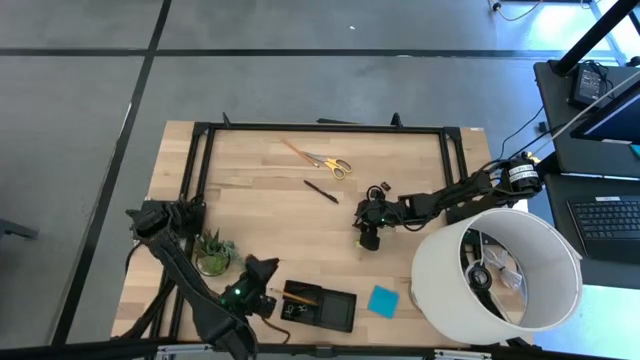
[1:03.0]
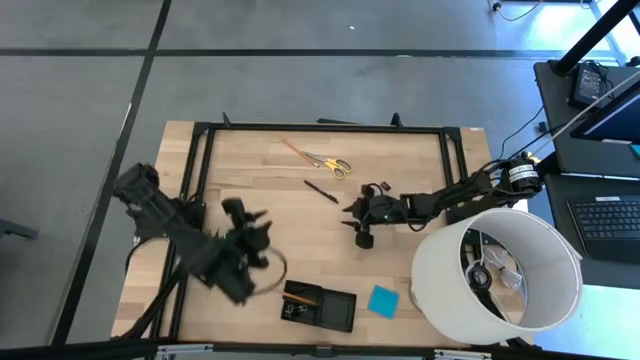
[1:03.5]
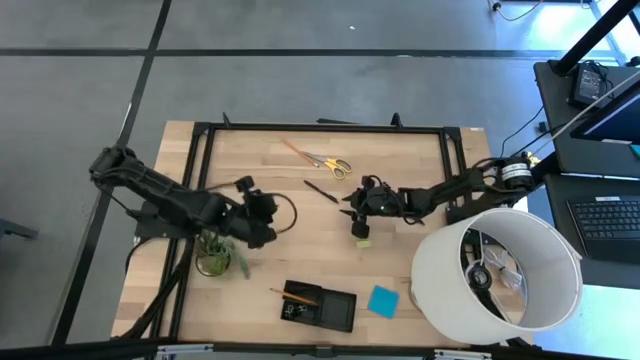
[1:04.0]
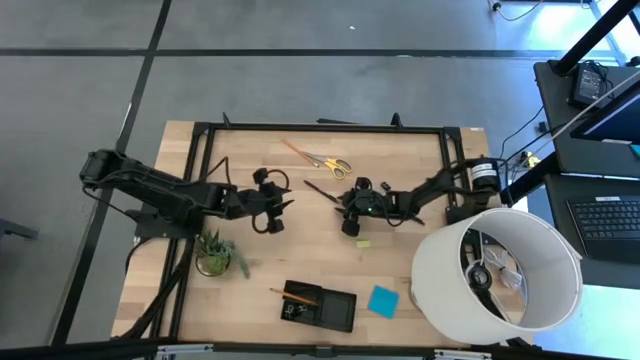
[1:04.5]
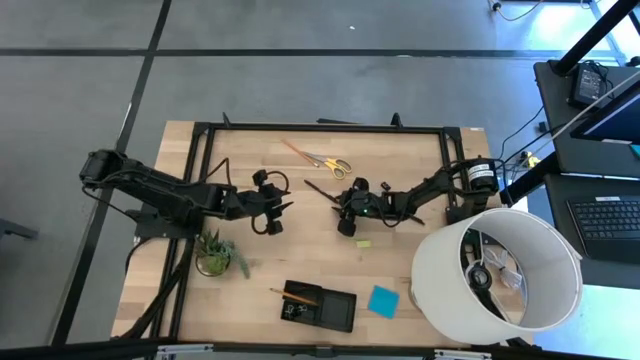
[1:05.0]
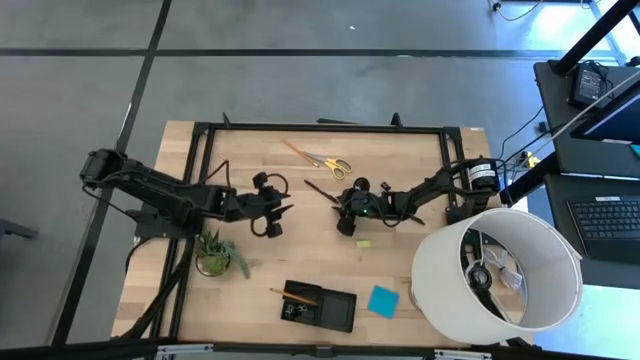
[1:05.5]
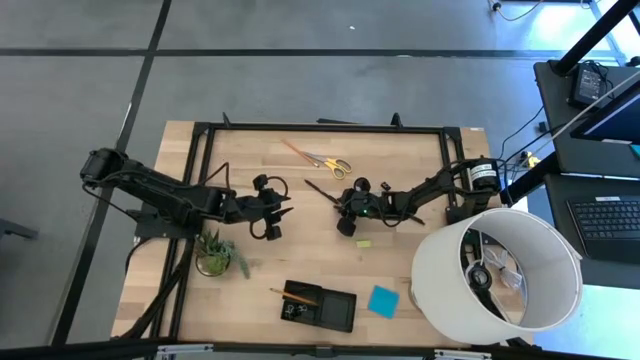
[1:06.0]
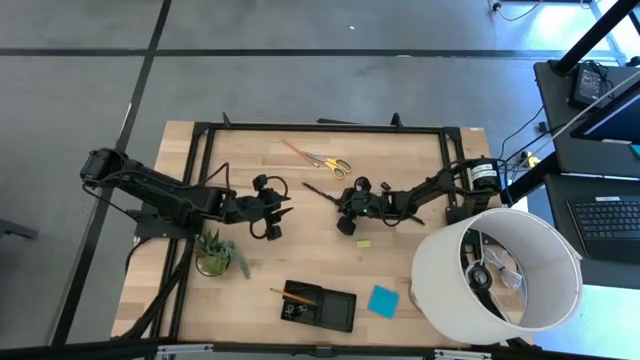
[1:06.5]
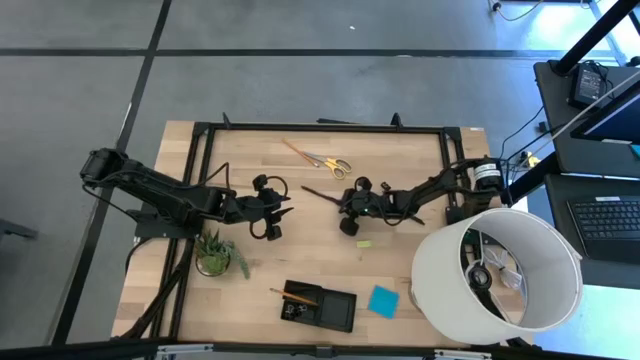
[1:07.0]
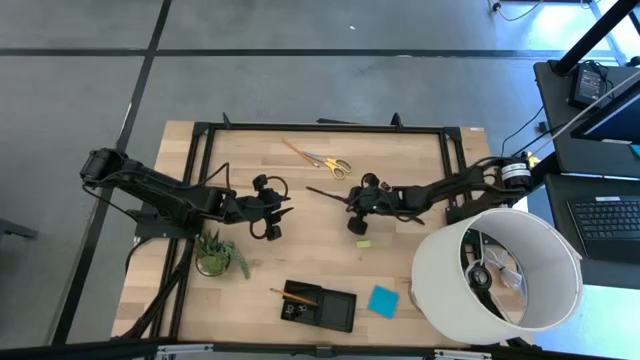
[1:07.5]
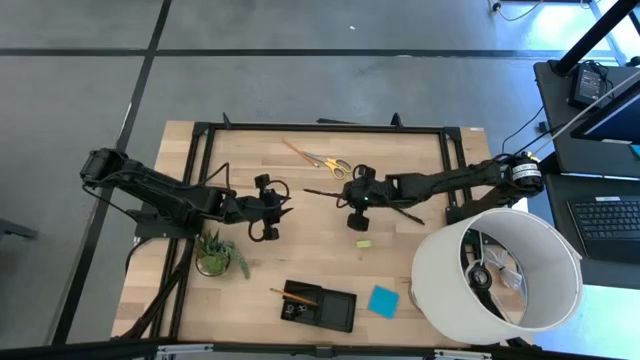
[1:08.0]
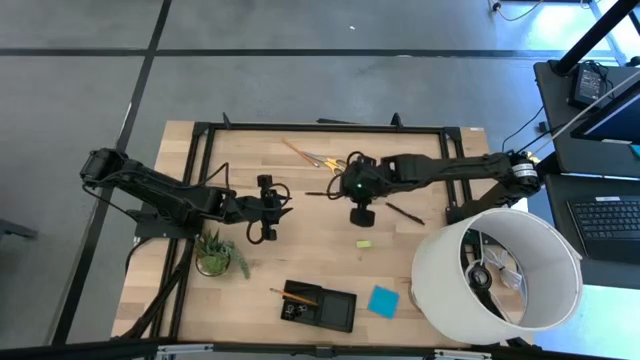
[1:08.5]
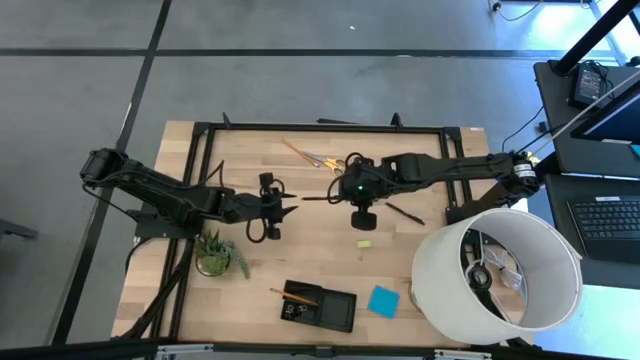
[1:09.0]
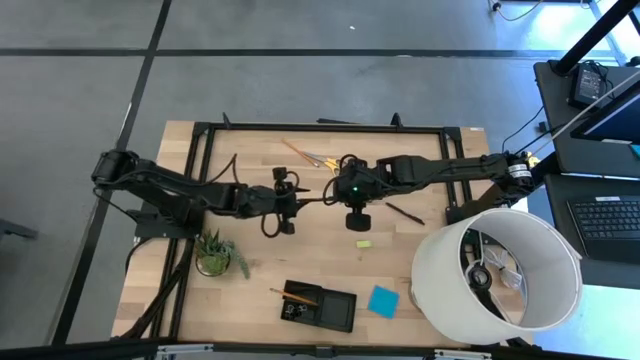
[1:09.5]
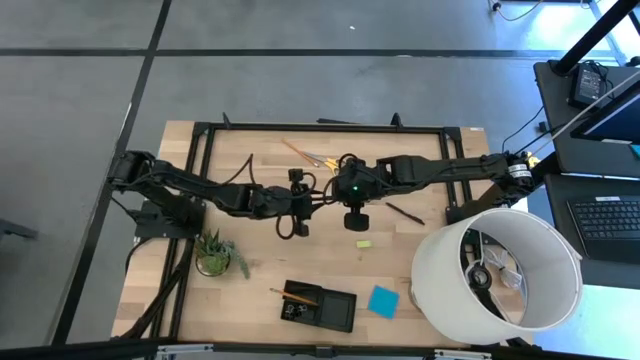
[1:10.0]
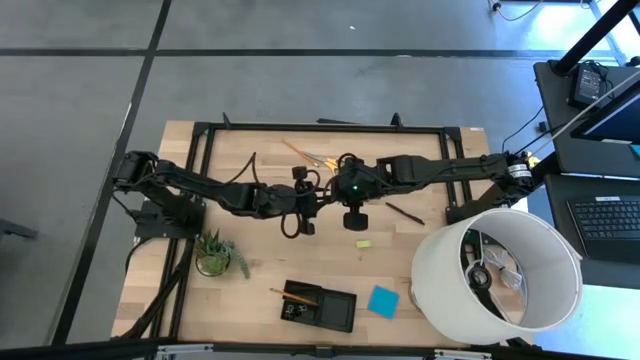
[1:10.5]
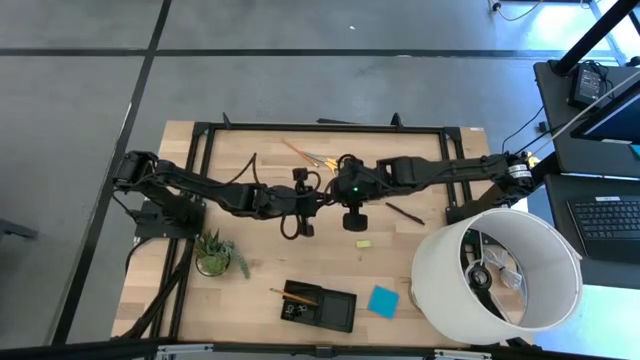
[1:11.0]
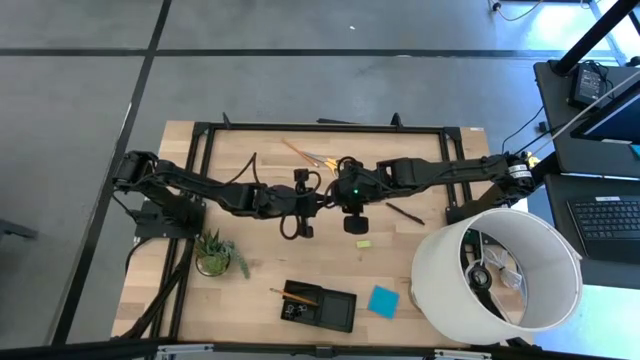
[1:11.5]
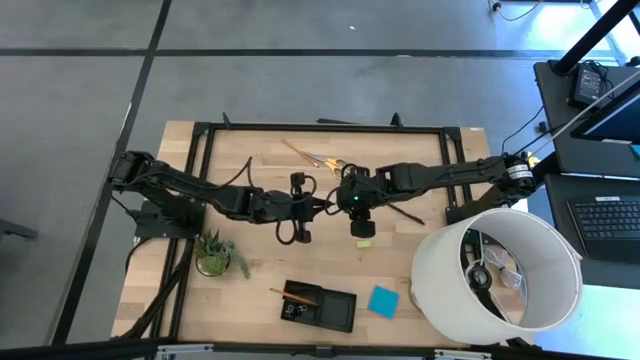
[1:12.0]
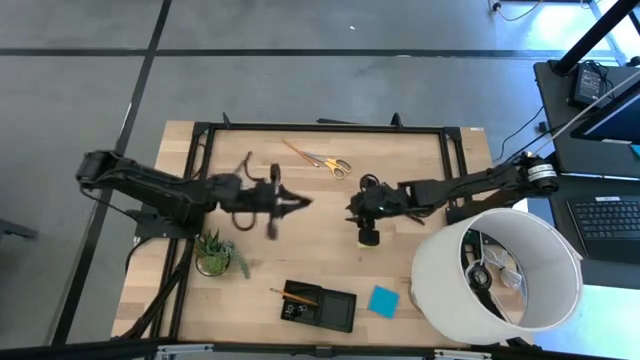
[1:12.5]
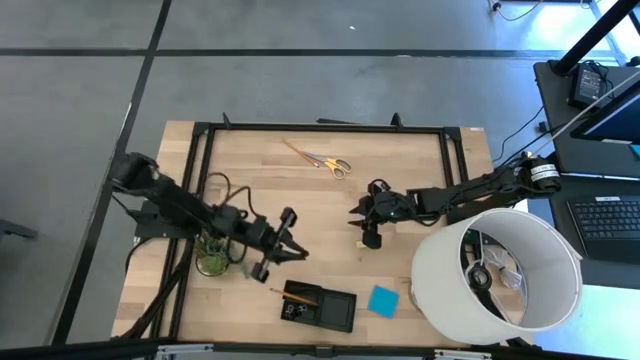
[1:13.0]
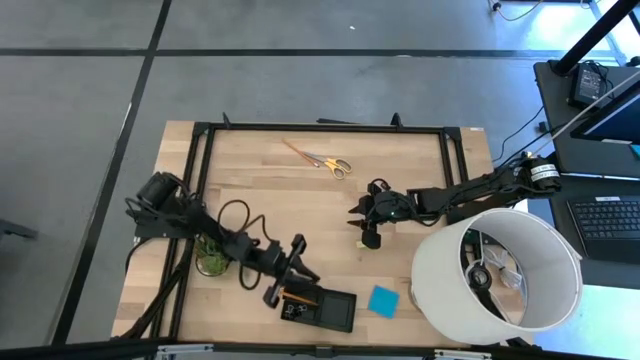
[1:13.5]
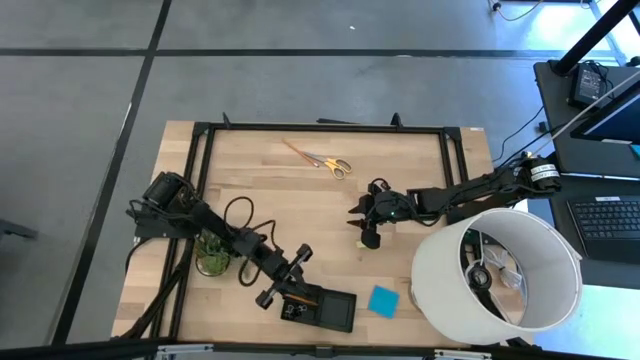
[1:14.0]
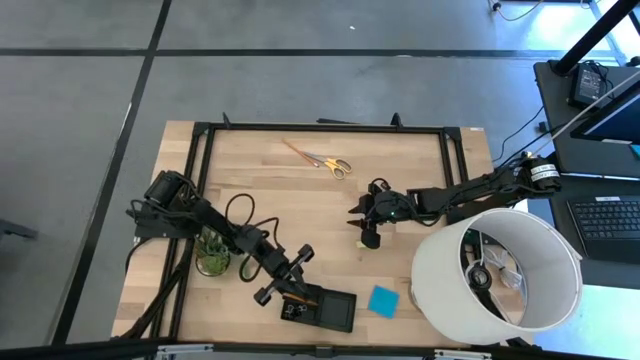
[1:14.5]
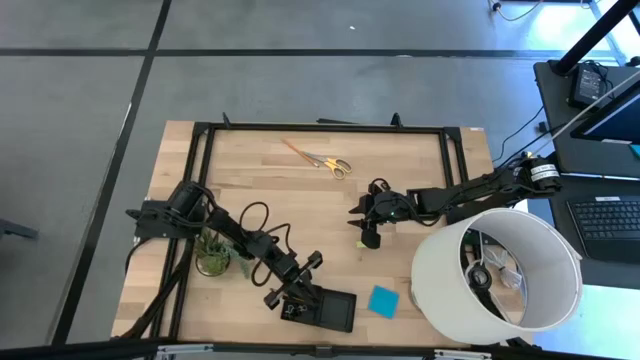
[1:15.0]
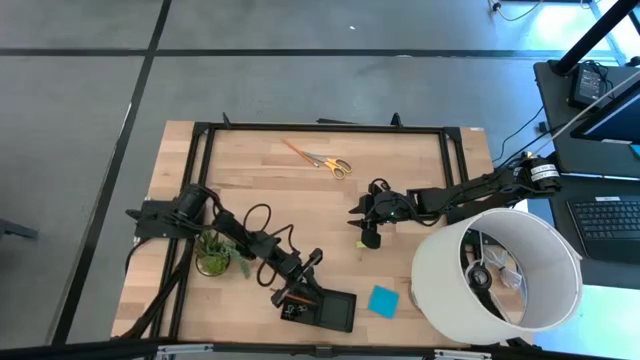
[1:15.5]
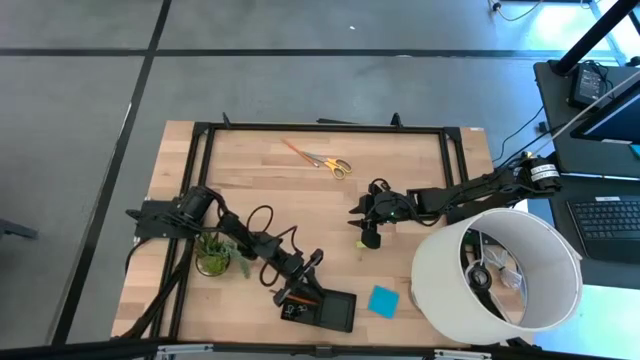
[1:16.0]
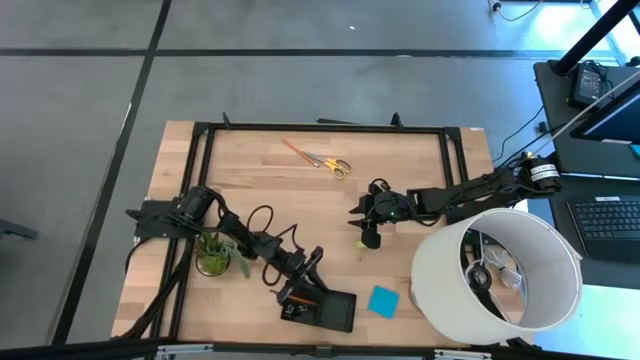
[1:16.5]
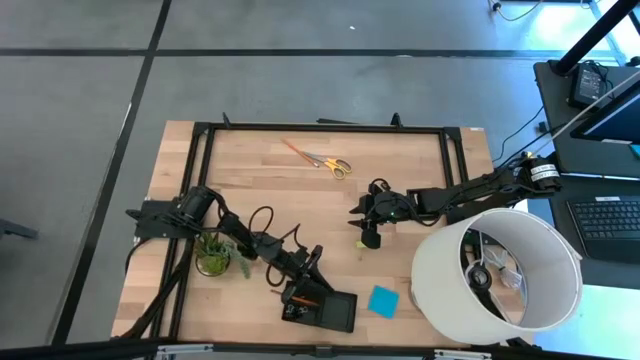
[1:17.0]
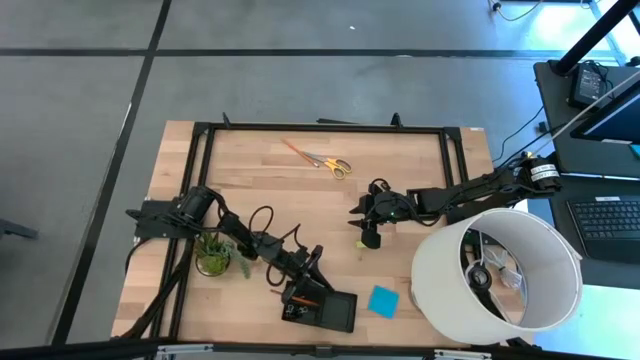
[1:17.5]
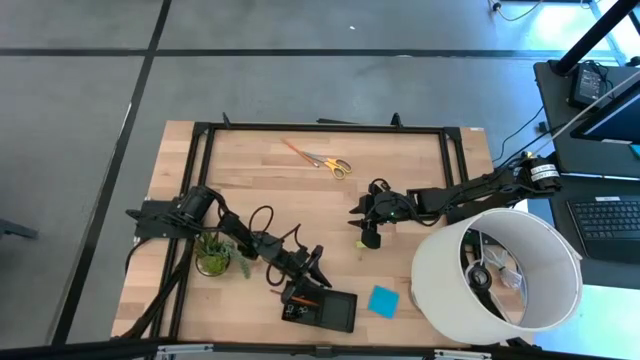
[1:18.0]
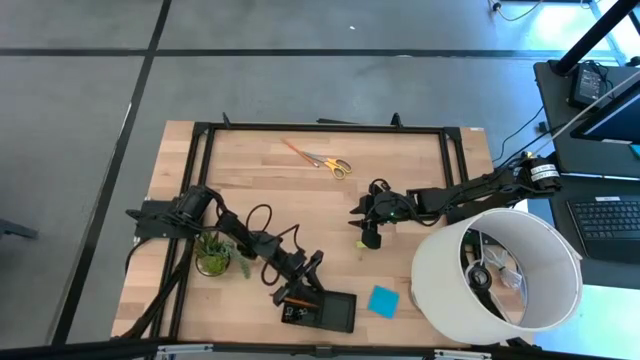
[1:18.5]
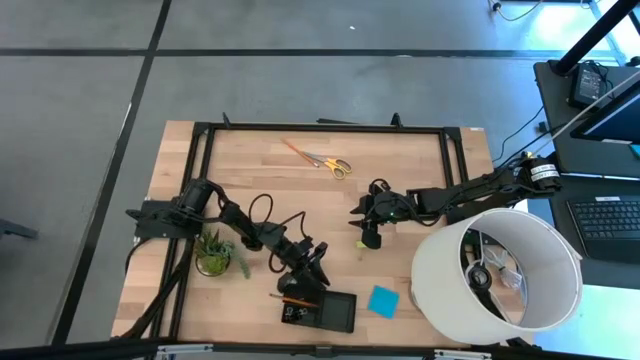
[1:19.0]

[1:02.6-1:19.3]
Task: Pick and place office supplies into organizer
Put the left black pen into the black desk organizer

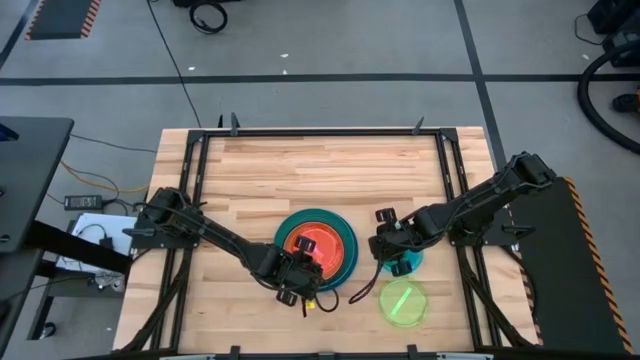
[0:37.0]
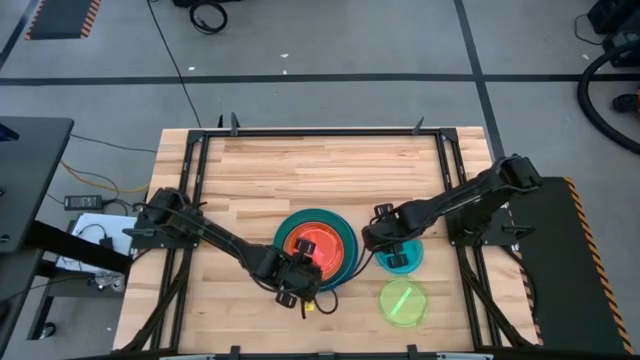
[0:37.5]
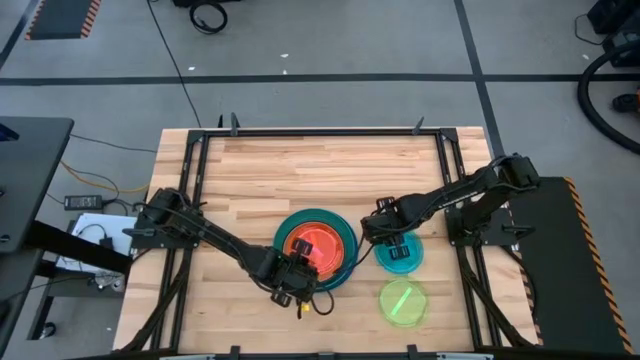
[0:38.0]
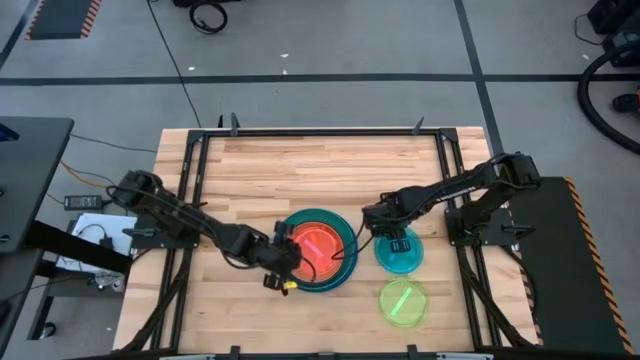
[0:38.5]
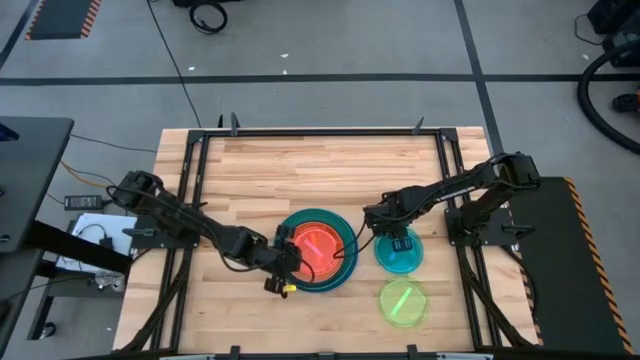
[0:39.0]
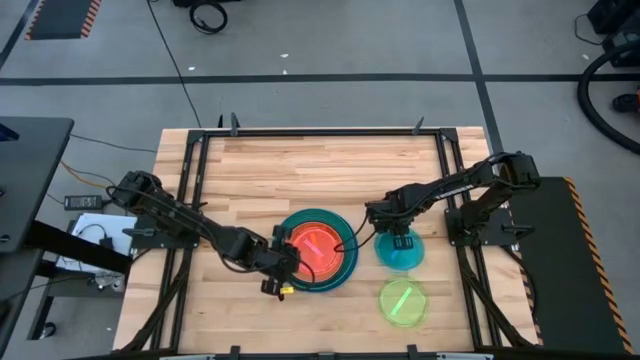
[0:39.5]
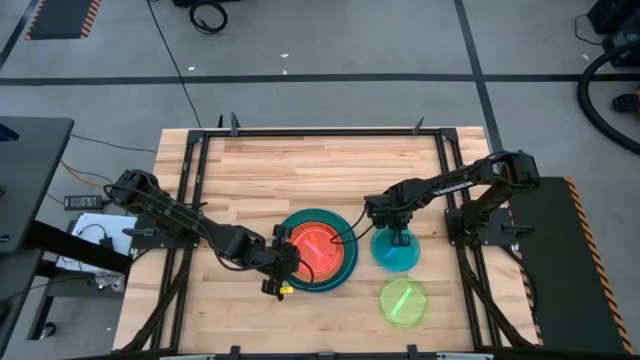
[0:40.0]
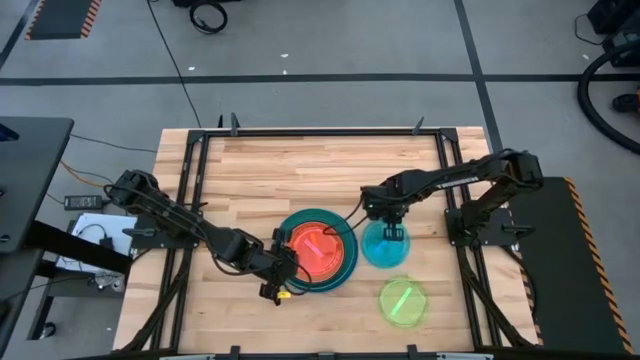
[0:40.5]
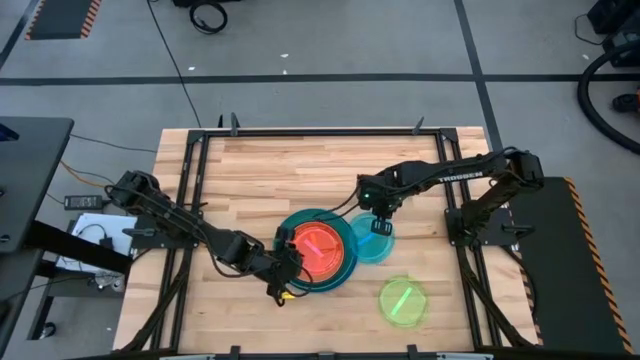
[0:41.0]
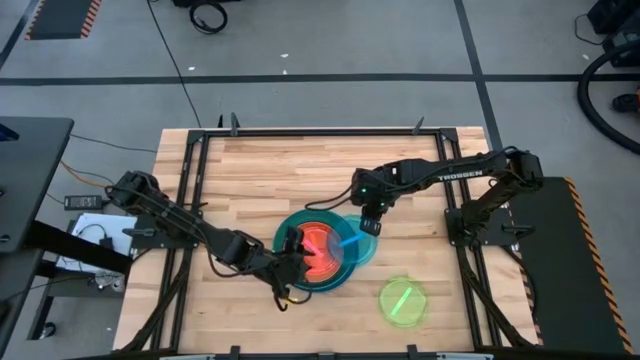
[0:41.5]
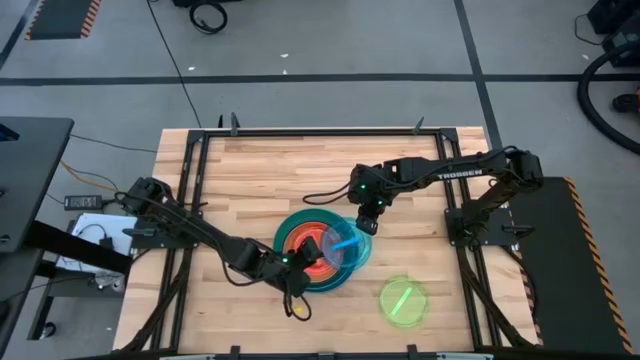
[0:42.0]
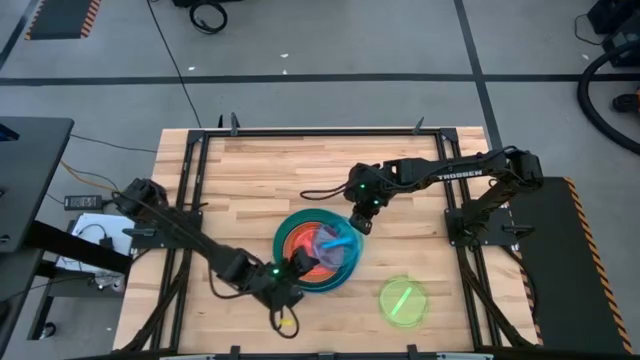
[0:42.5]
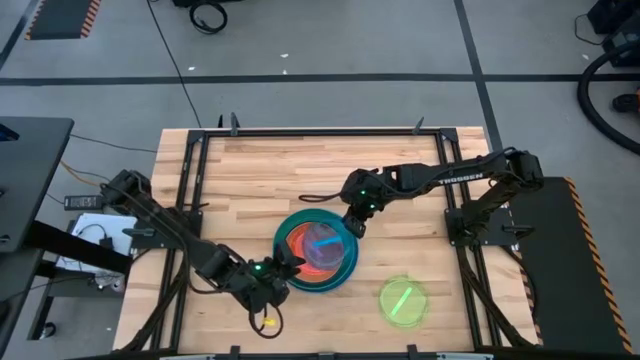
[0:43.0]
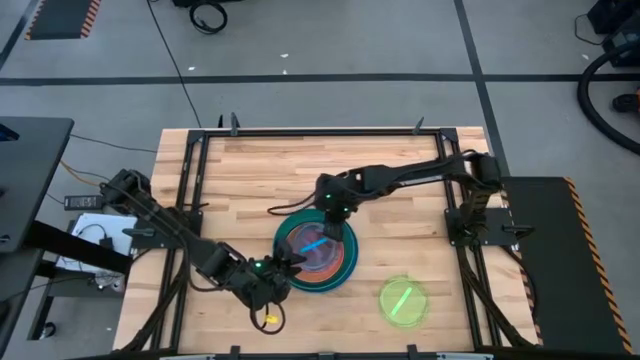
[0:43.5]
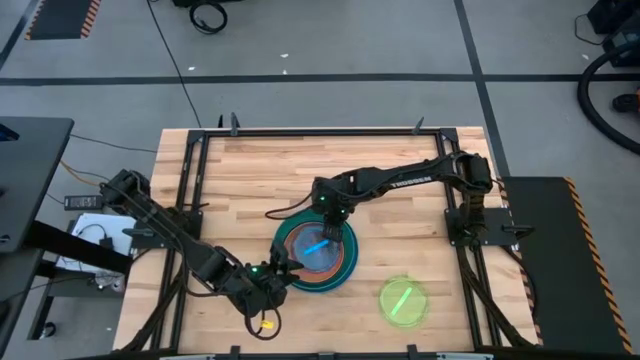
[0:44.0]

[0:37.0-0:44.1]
Task: Stack plastic plates
Stack the blue transparent plate on top of the pink transparent plate
